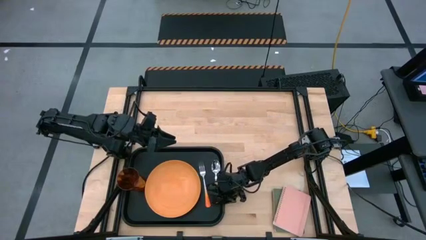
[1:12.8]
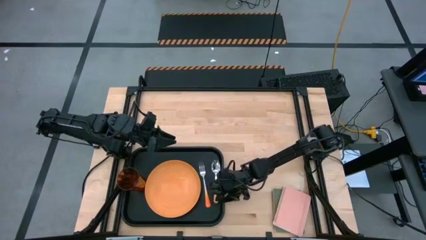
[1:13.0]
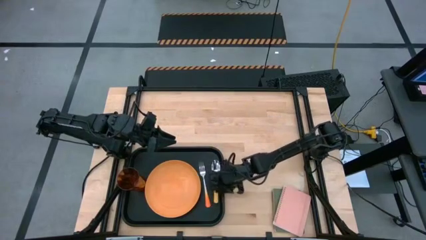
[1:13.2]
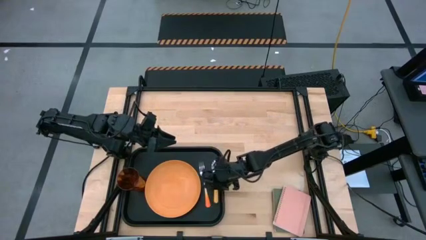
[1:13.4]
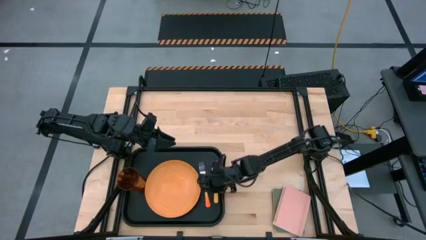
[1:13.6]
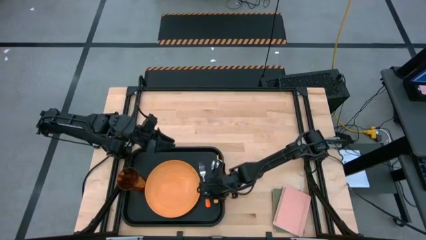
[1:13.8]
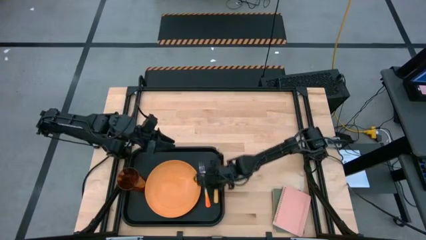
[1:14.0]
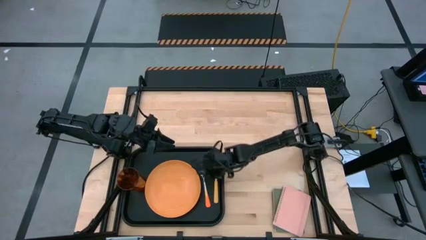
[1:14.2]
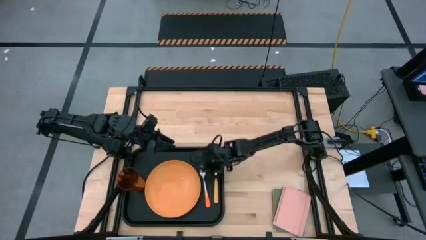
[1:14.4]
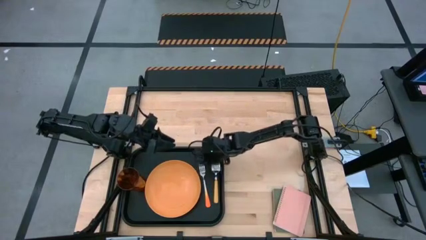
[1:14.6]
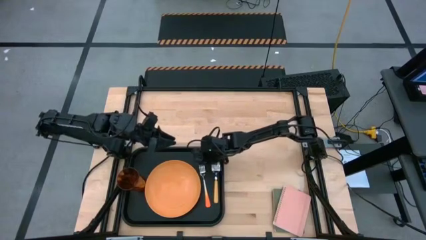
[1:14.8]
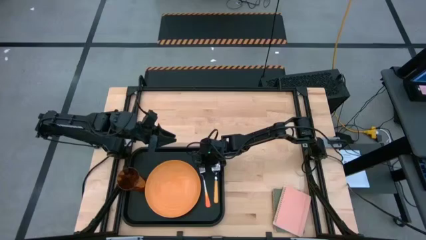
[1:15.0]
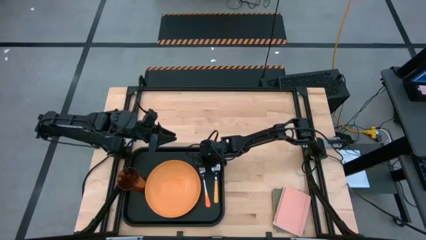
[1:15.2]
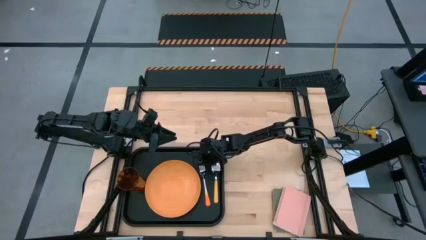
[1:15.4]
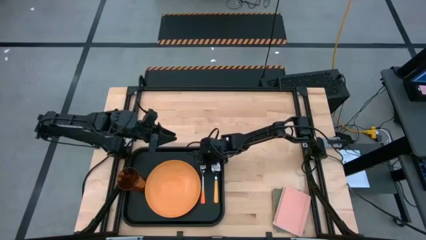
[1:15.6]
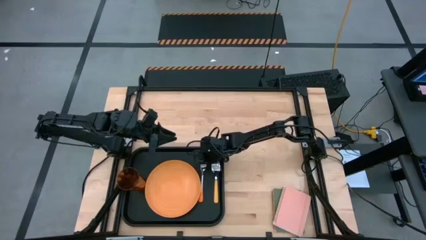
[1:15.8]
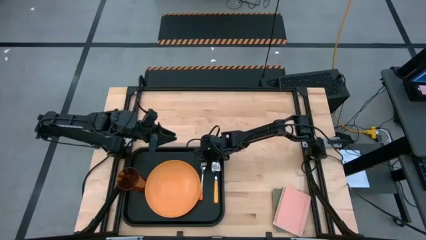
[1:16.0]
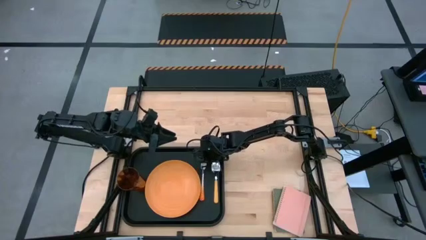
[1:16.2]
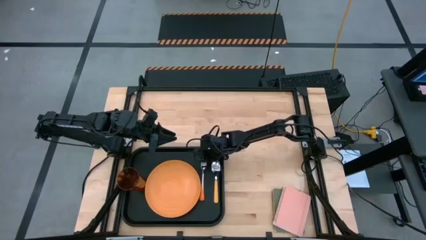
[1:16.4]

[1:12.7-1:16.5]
Task: Pick and place plate/cup/fork/spoon on tray
Adjust the fork on the black tray

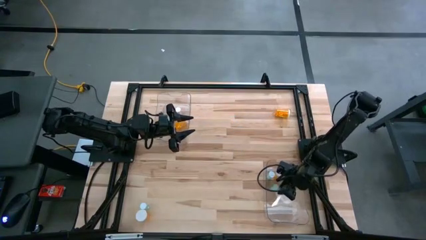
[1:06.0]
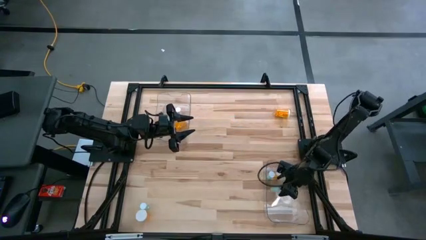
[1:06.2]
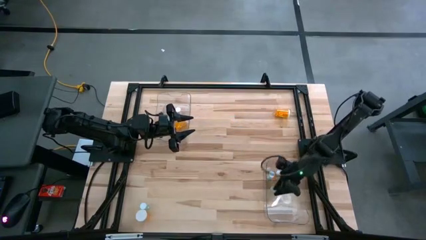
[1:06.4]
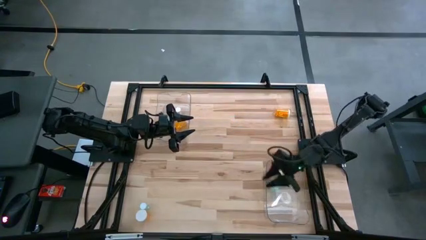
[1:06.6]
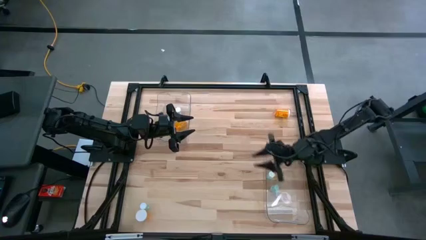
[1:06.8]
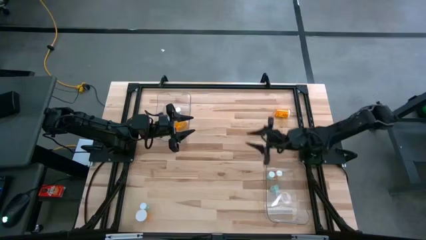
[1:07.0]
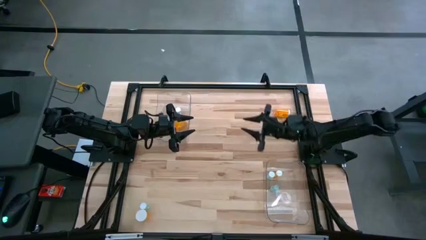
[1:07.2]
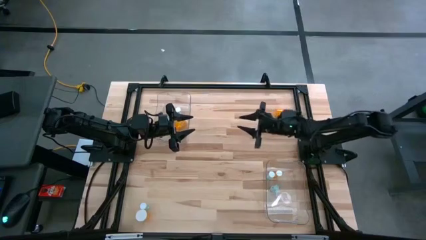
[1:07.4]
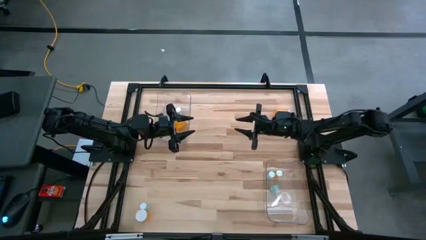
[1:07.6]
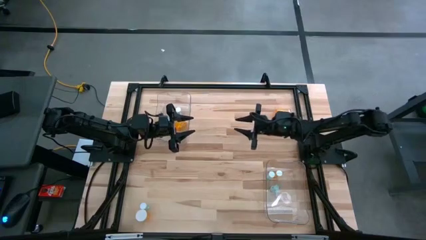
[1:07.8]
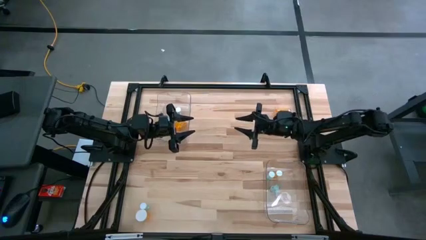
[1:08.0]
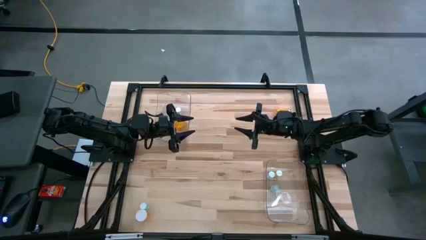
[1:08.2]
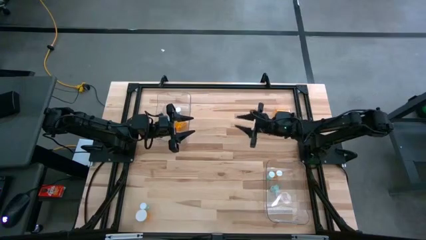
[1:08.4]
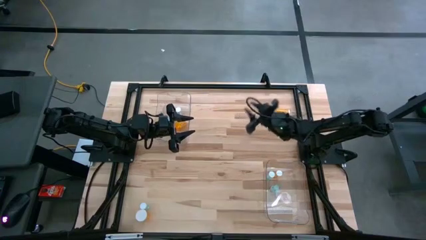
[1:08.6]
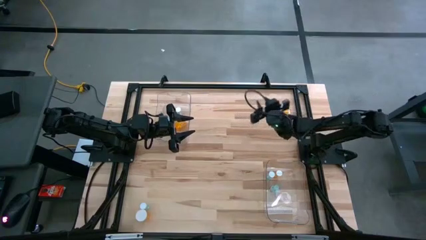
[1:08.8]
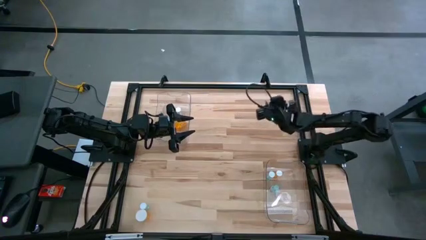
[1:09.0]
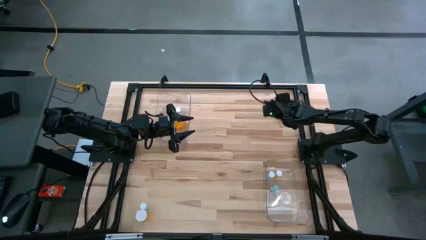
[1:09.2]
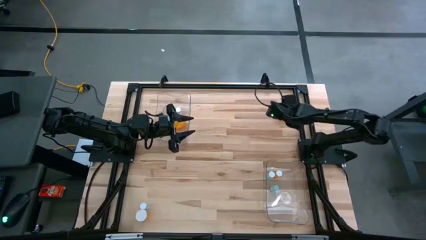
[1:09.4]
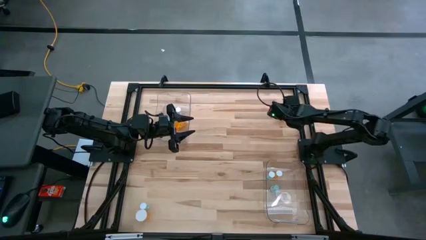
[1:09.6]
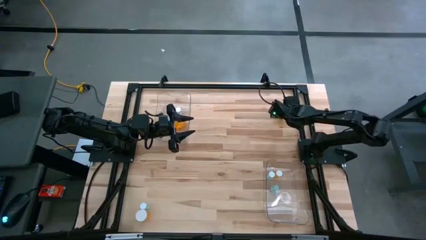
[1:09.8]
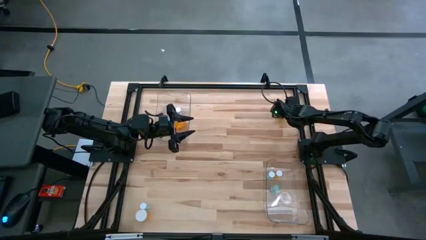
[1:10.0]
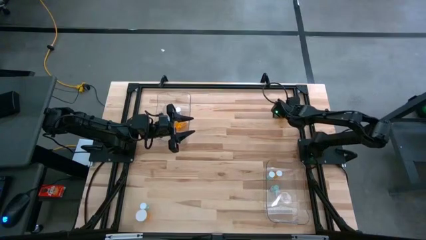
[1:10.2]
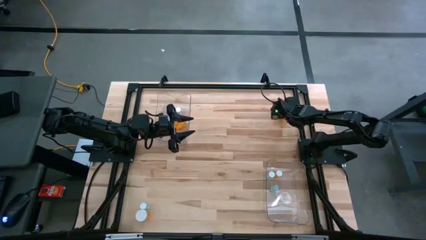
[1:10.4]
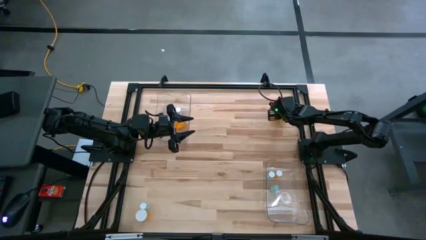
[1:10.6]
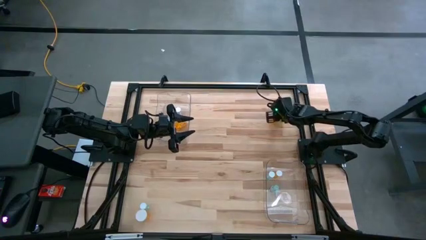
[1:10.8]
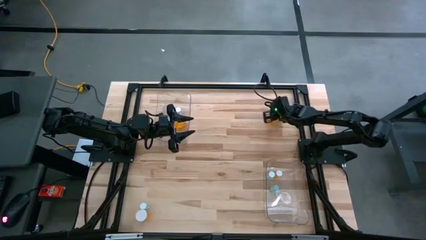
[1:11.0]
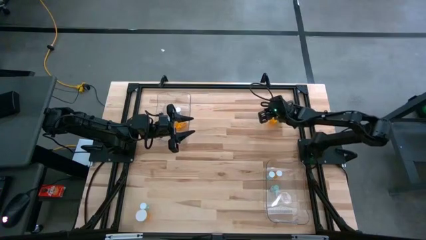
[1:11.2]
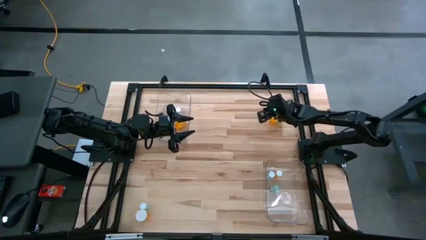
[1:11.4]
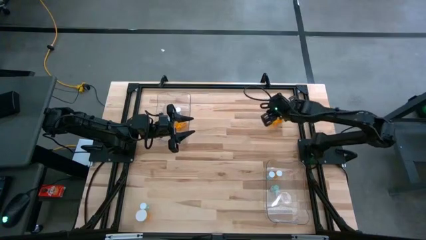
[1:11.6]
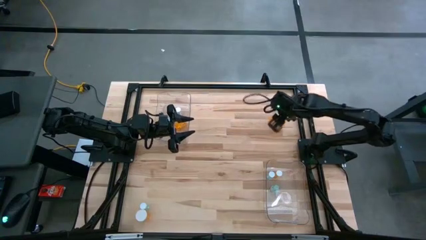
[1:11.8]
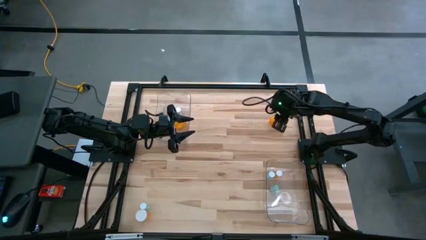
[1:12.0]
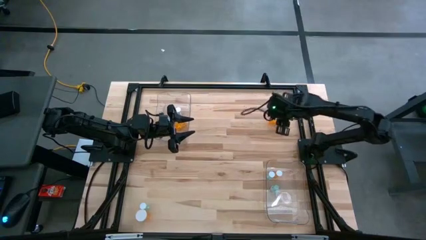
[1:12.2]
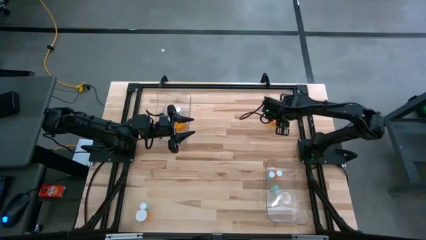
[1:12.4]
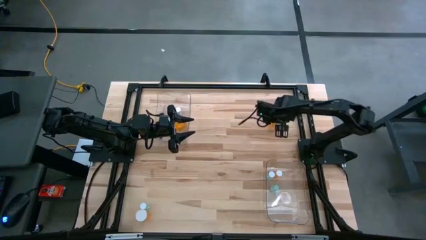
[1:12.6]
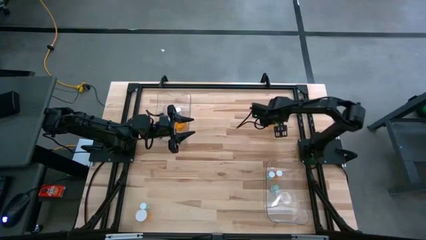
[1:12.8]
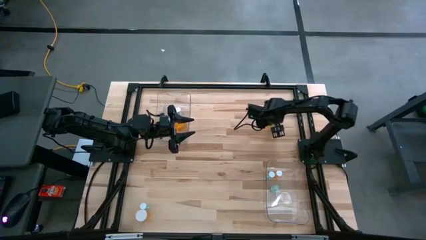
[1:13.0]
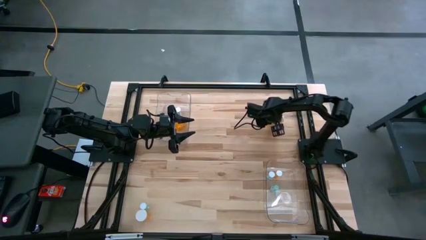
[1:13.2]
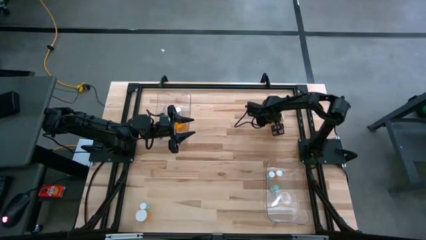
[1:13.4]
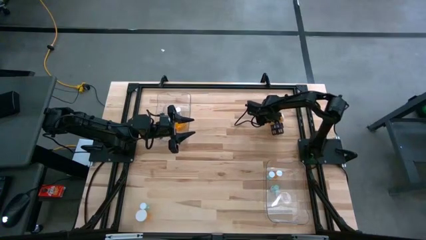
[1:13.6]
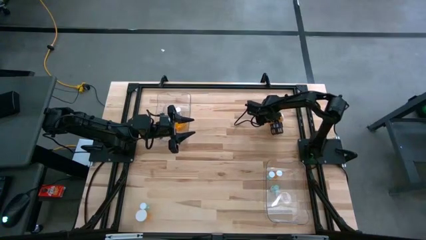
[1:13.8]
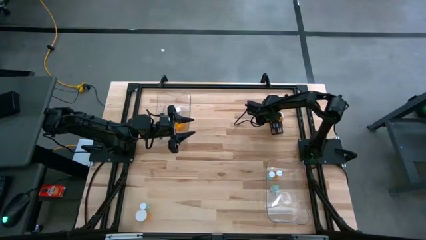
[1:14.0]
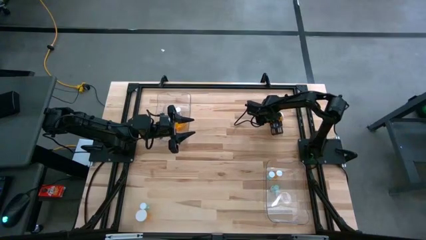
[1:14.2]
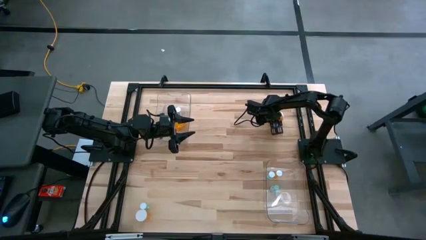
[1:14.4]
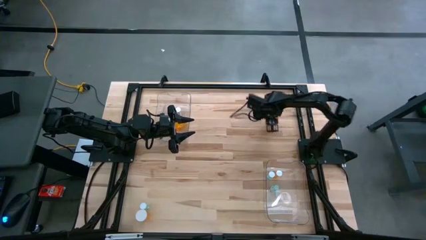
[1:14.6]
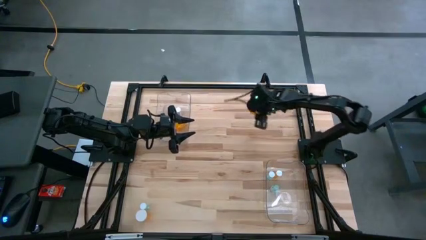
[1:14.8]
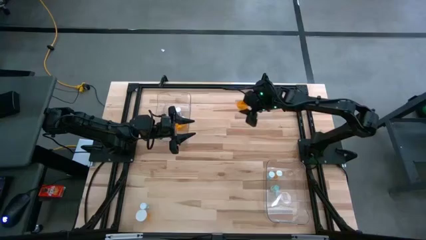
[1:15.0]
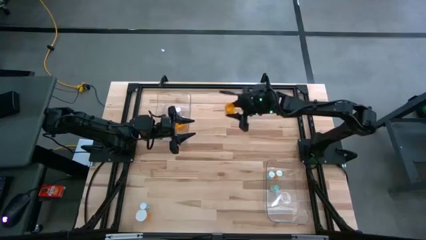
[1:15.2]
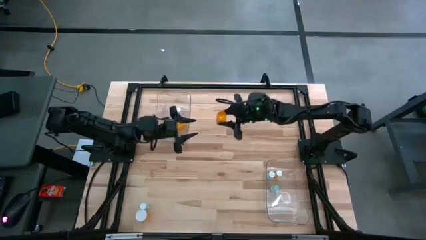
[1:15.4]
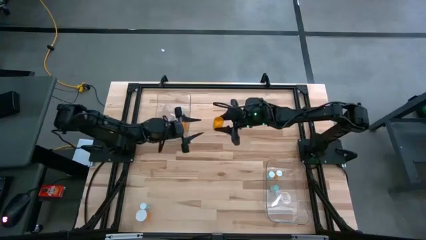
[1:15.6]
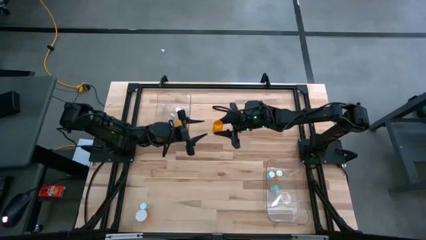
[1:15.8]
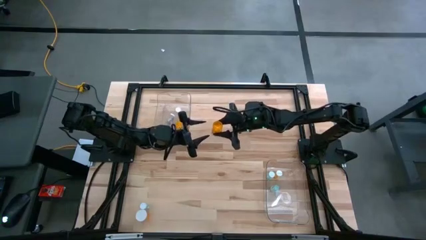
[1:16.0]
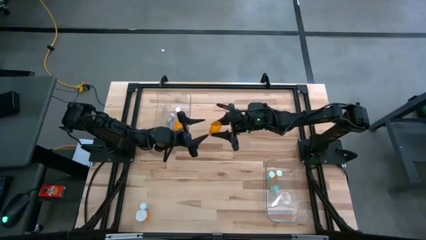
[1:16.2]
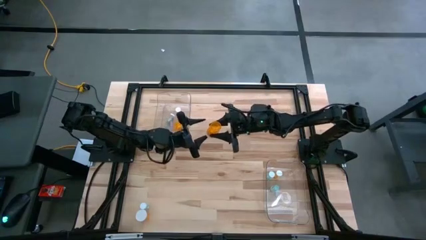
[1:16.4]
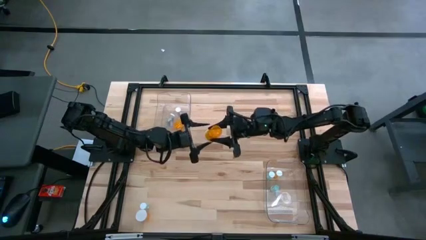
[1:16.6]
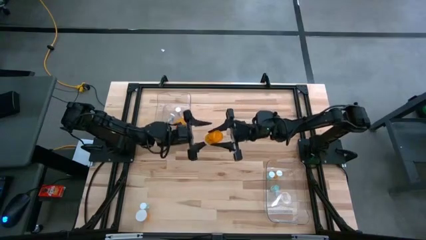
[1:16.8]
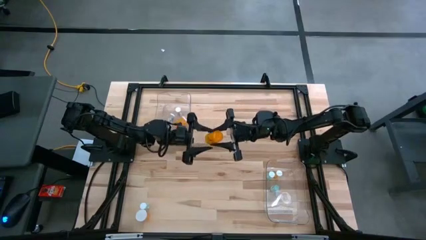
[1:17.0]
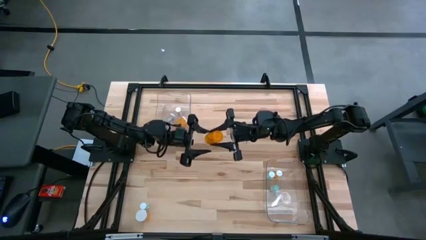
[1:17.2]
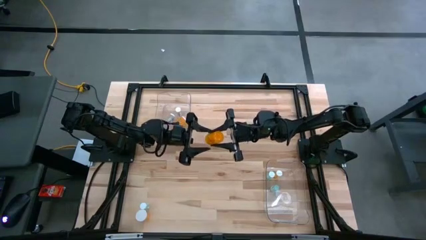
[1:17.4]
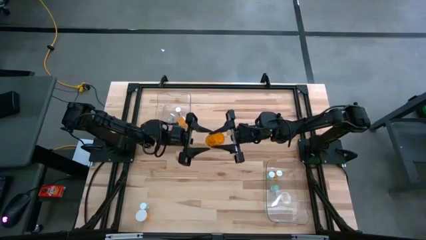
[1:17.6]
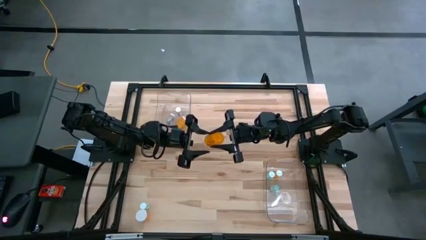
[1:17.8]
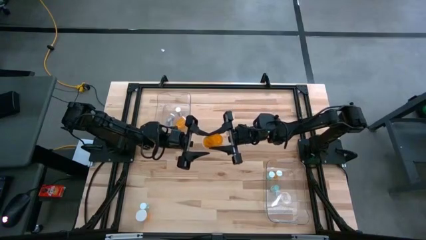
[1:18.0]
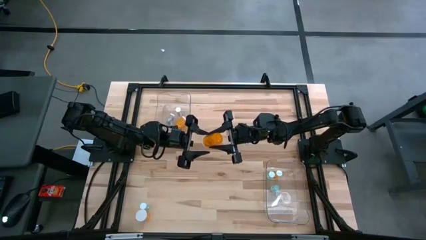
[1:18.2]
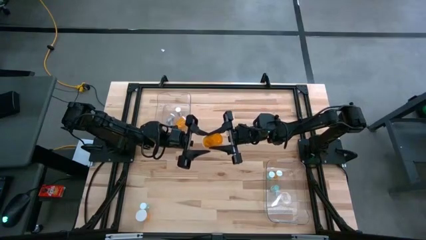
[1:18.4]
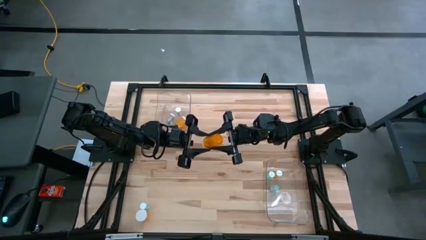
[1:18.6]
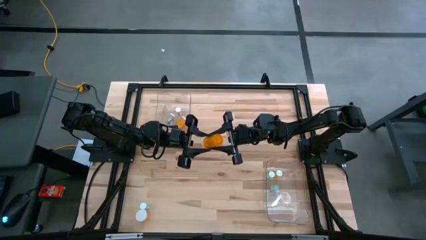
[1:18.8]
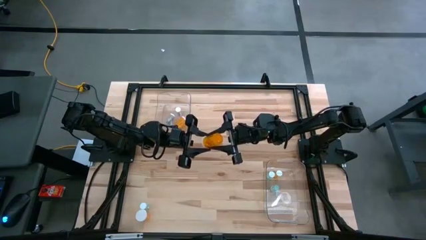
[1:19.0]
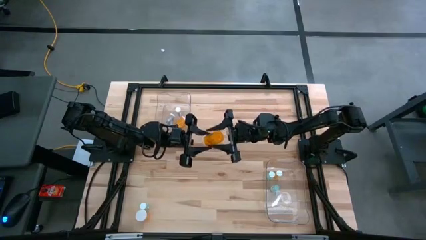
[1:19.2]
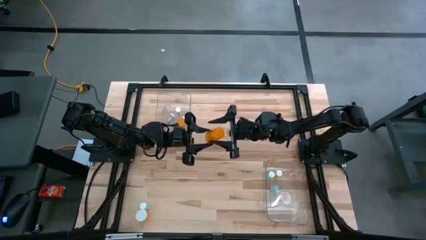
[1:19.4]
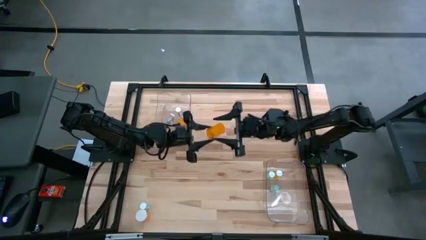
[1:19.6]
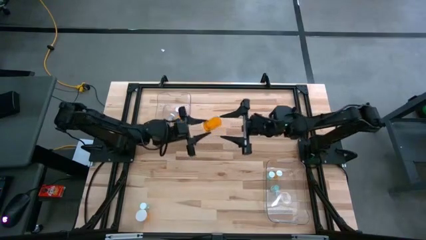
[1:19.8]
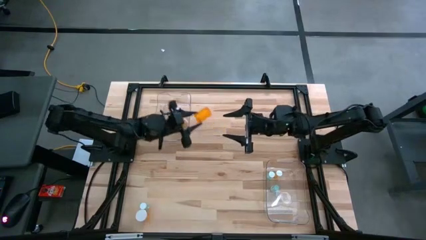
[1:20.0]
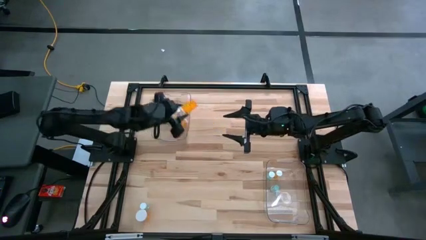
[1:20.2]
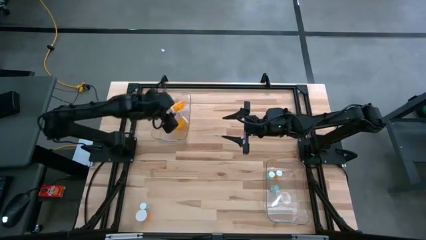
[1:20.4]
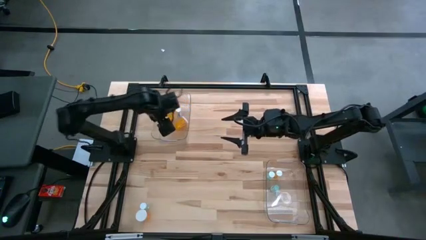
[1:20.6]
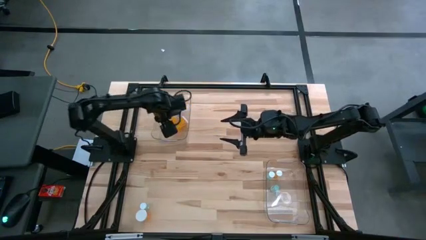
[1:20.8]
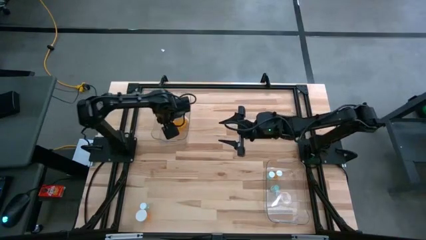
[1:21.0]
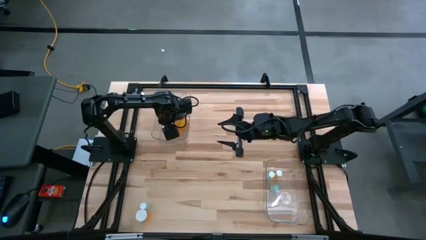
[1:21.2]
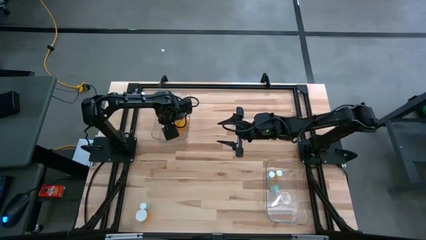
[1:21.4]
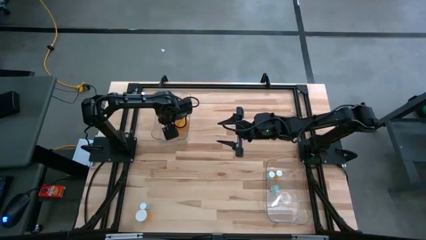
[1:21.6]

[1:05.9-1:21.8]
Task: Pick and place medicine bottles into bin by pill shape (circle, oval)
Put the orange capsule bottle into the left transparent bin
